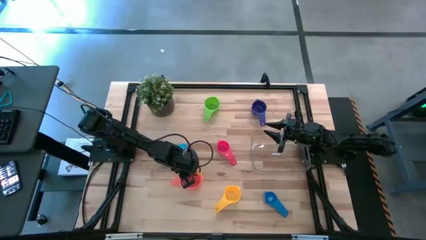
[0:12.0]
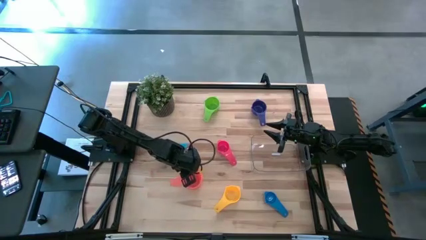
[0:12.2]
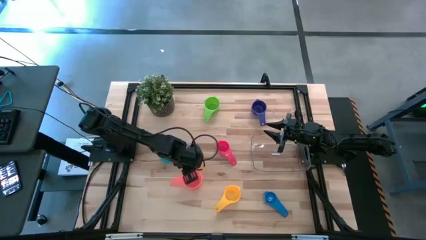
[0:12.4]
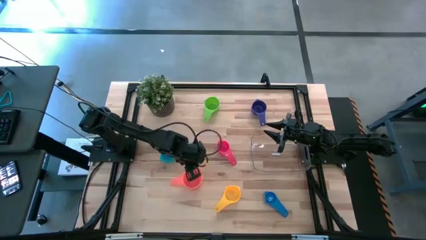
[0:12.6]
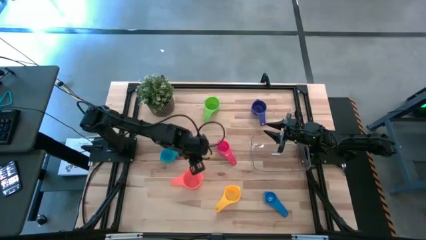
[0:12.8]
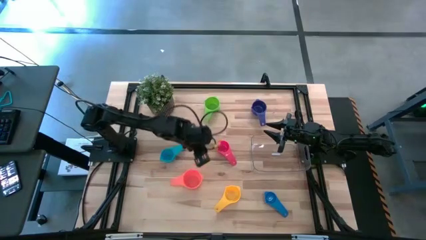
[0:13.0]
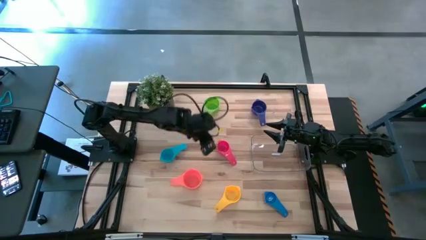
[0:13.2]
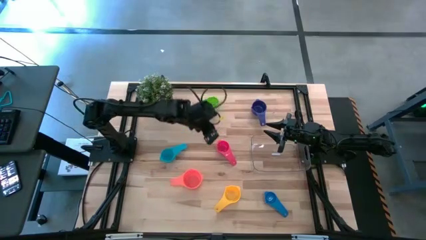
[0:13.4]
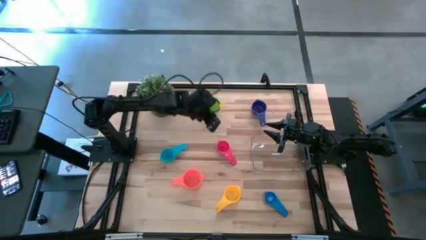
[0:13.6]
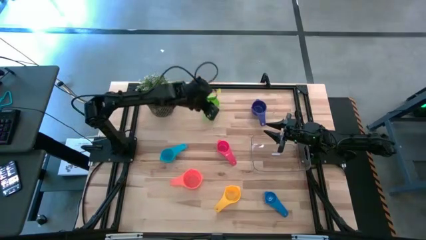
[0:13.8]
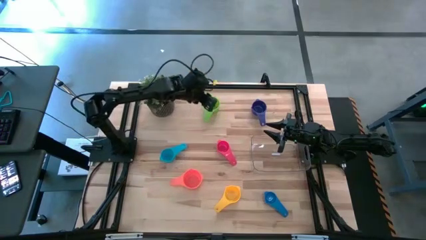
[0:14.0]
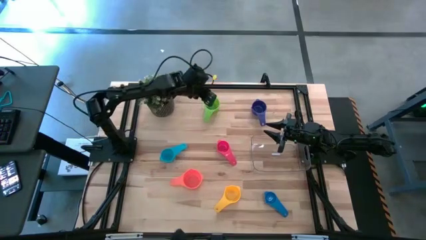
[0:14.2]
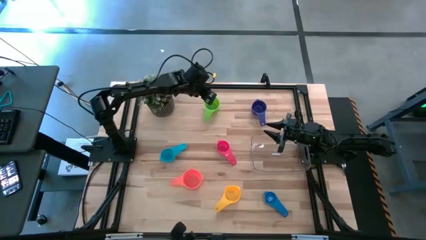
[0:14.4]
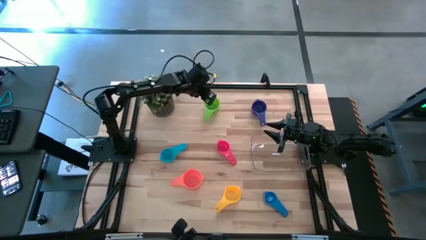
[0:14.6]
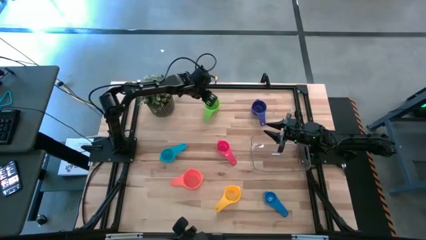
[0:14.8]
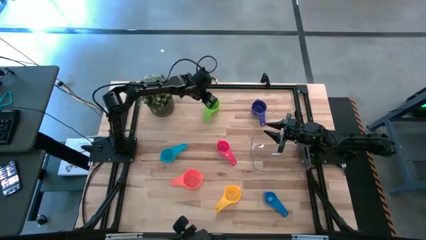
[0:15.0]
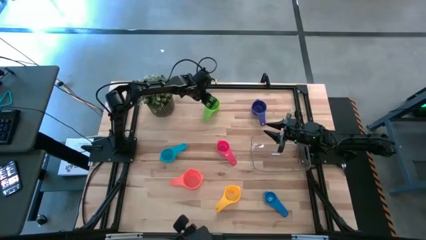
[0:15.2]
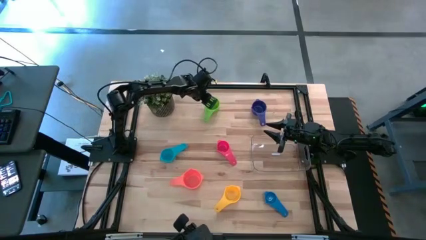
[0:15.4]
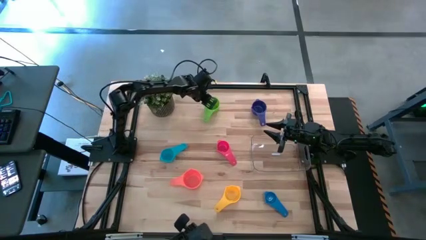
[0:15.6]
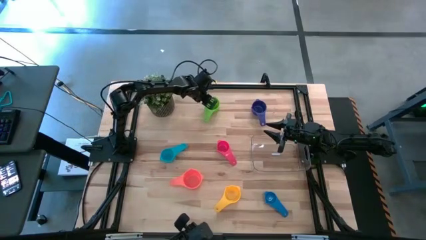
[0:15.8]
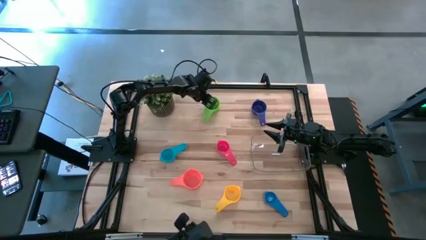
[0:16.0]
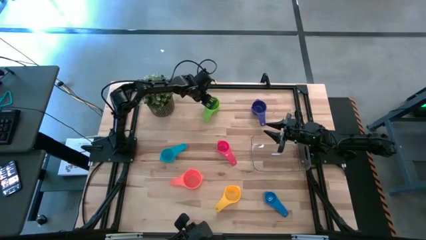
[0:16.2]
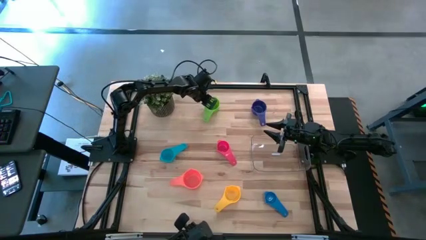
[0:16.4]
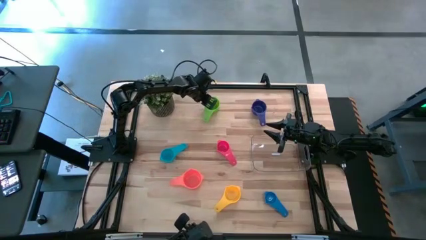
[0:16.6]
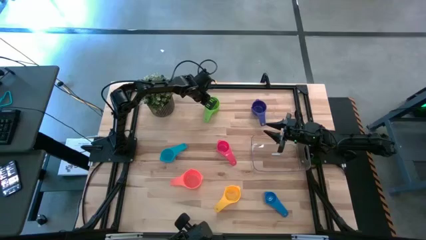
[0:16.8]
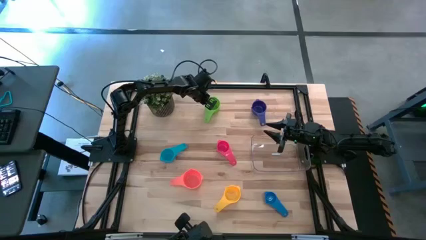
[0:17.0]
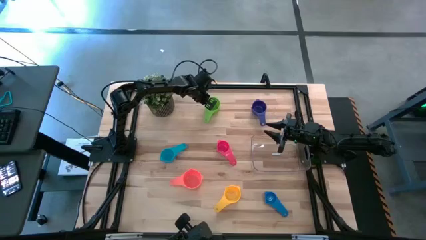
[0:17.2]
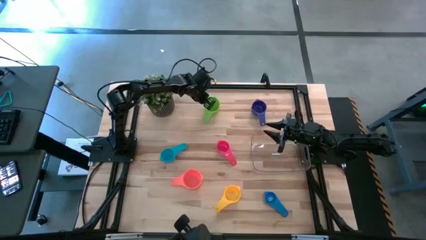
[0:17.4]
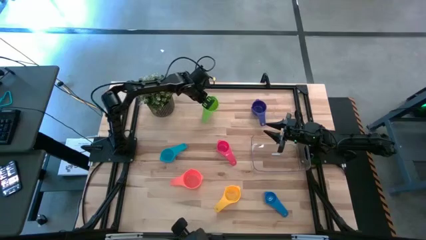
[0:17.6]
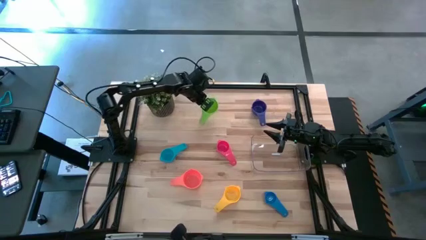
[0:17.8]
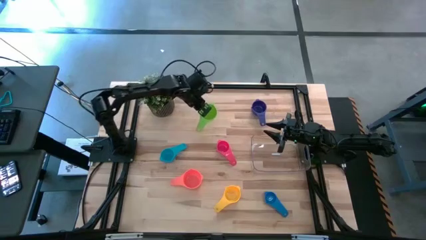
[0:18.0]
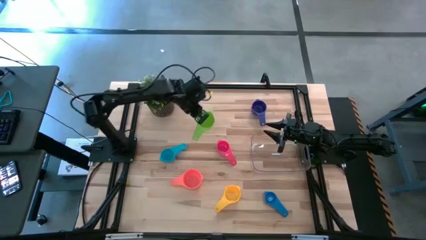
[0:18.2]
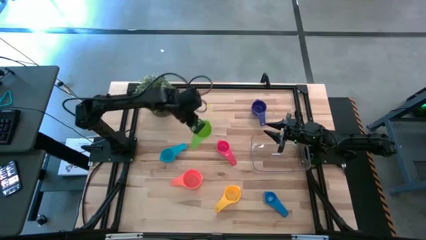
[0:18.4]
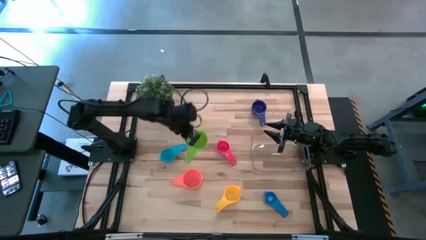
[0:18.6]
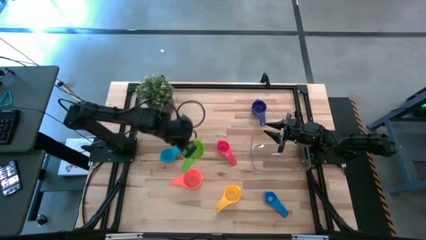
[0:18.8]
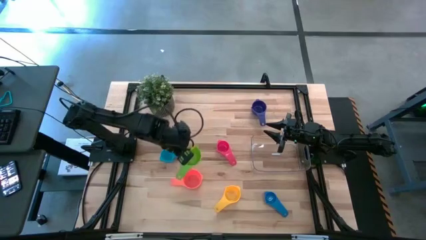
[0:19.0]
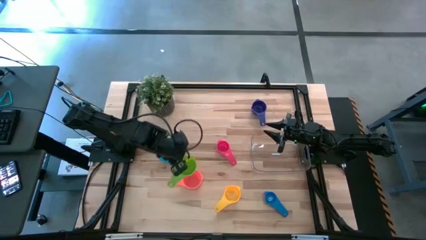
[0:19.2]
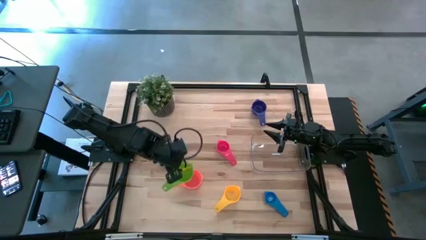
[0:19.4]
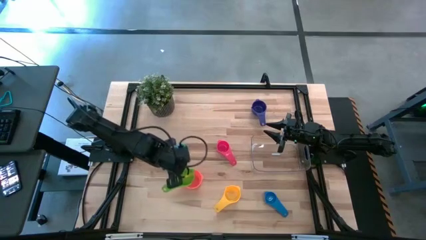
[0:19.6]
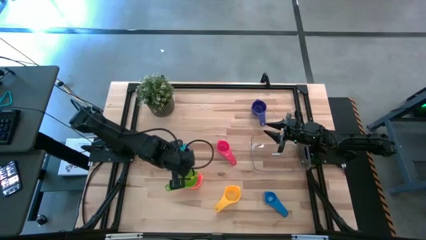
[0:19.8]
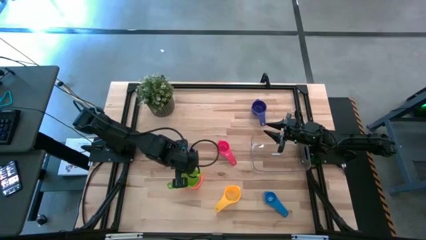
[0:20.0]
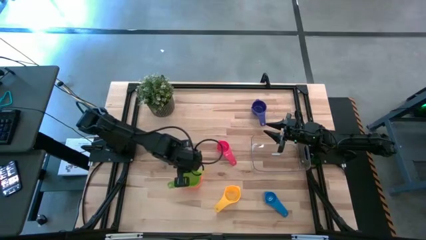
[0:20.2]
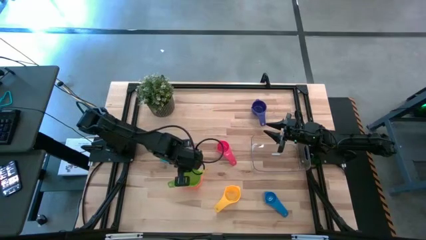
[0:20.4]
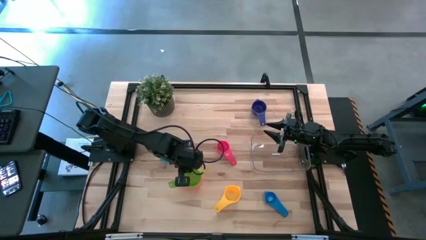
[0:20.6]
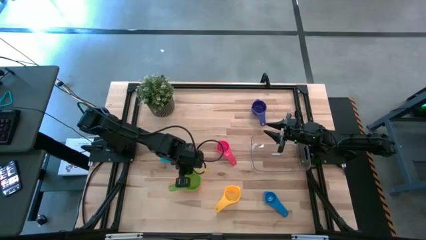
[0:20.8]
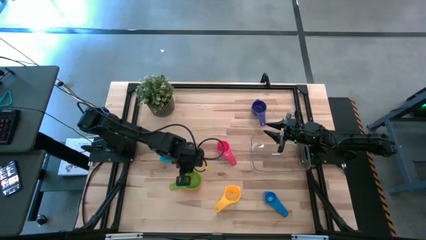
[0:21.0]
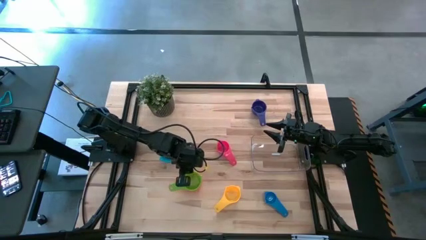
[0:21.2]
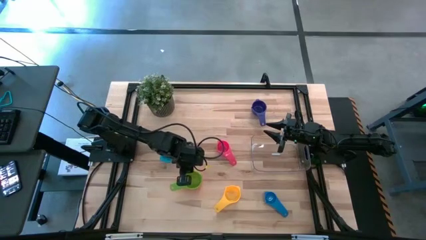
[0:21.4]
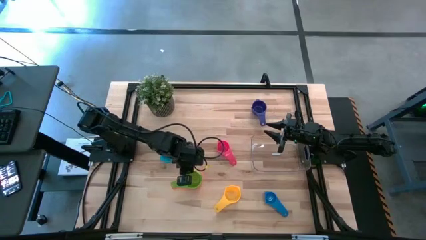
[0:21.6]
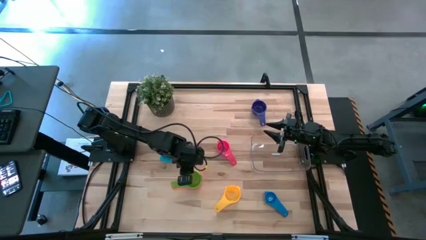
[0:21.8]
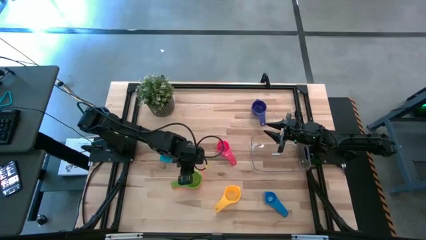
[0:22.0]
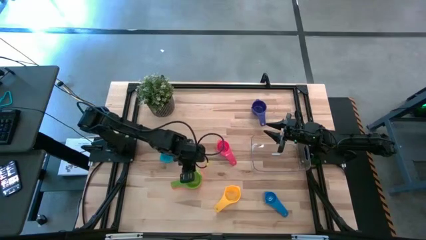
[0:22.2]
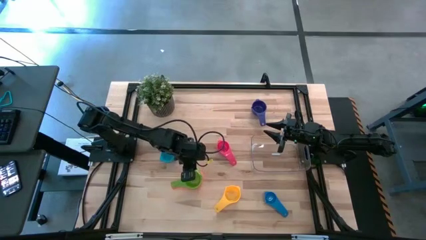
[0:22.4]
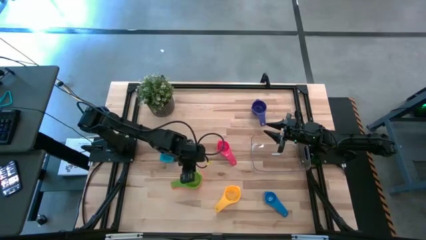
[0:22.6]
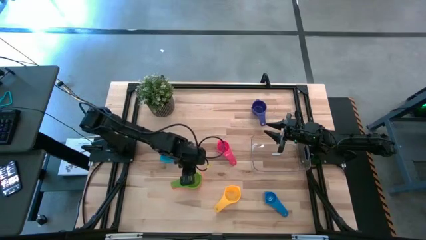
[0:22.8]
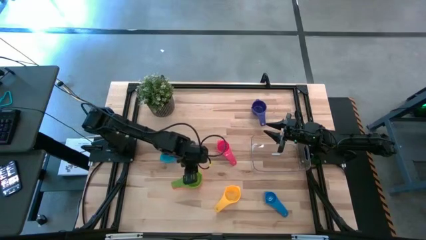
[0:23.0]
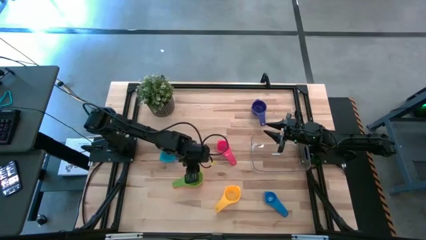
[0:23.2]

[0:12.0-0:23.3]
Task: Nest measuring cups in basket
Stack the green measuring cup on top of the orange measuring cup

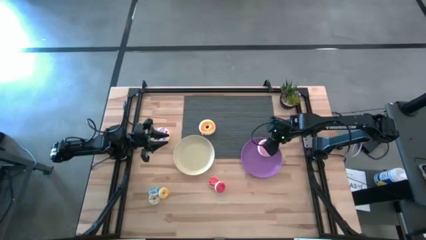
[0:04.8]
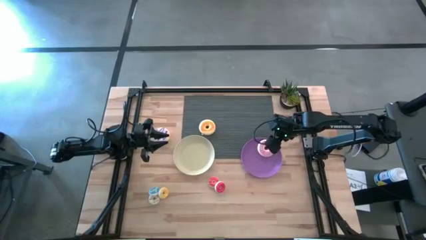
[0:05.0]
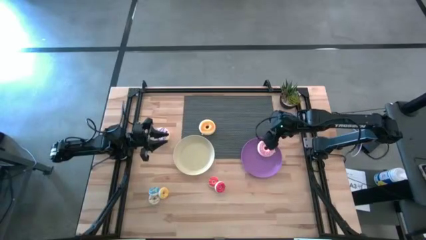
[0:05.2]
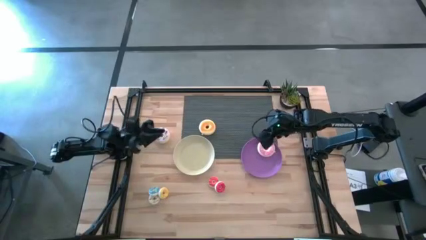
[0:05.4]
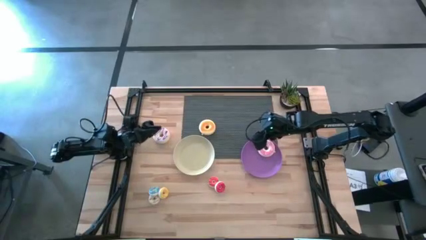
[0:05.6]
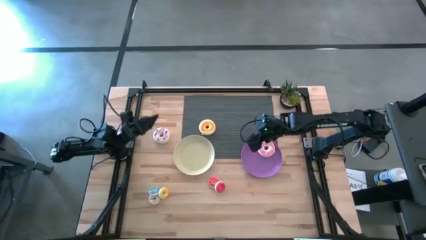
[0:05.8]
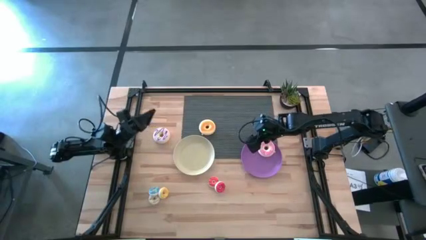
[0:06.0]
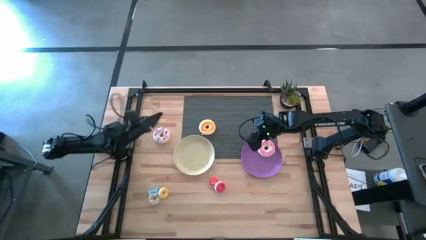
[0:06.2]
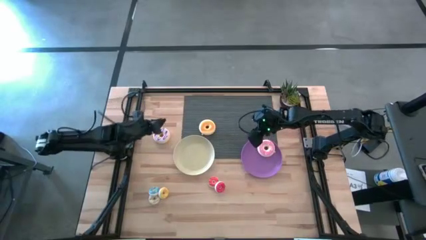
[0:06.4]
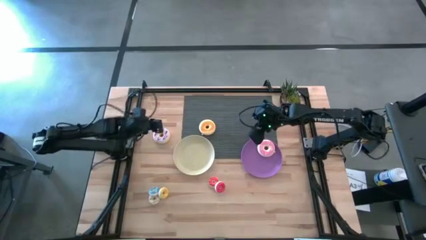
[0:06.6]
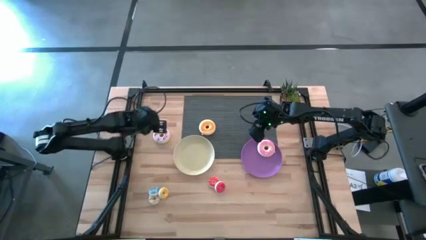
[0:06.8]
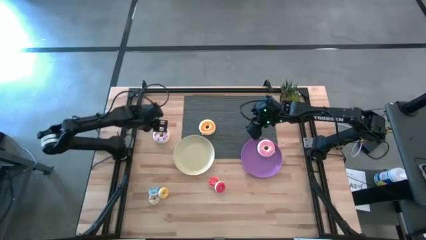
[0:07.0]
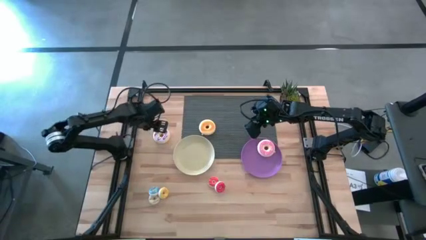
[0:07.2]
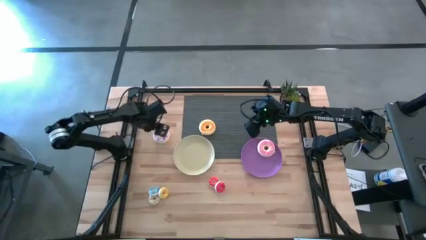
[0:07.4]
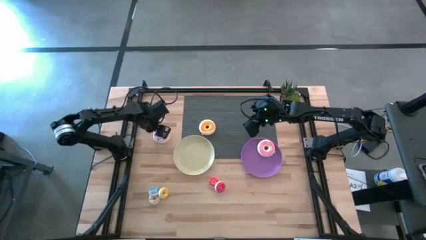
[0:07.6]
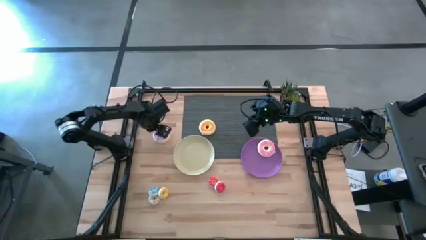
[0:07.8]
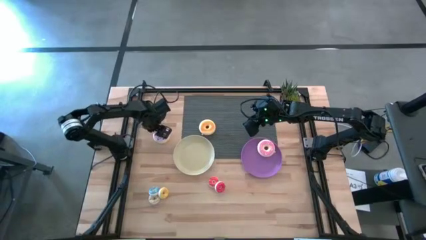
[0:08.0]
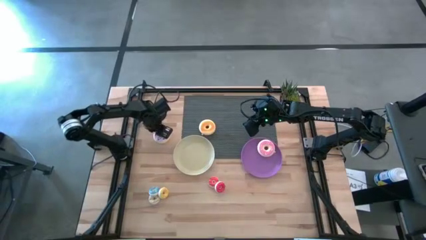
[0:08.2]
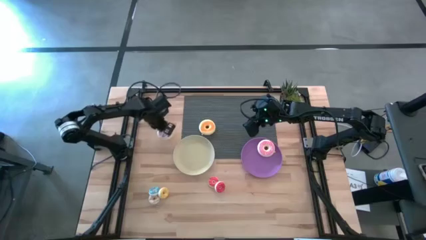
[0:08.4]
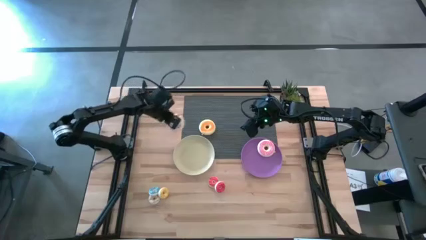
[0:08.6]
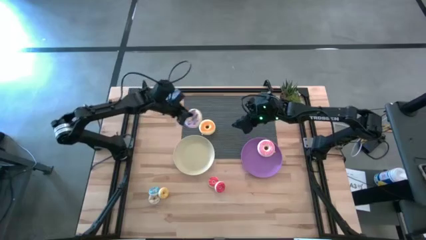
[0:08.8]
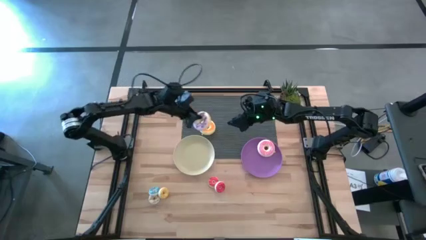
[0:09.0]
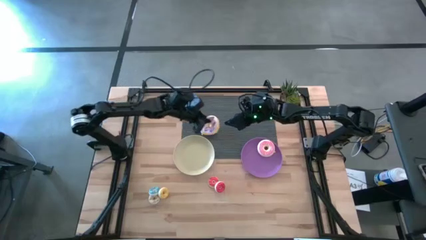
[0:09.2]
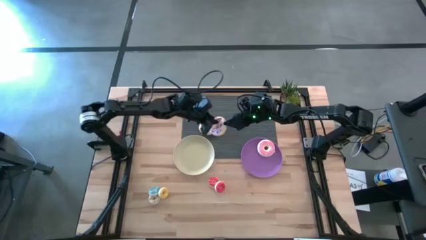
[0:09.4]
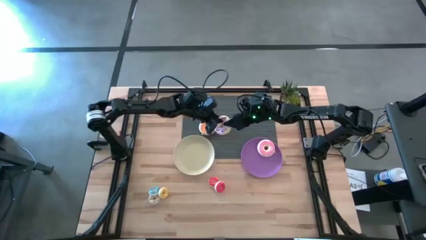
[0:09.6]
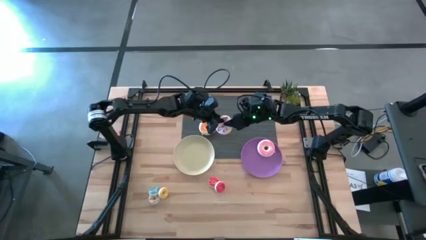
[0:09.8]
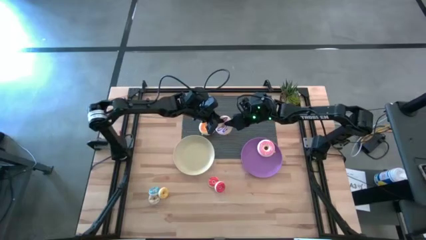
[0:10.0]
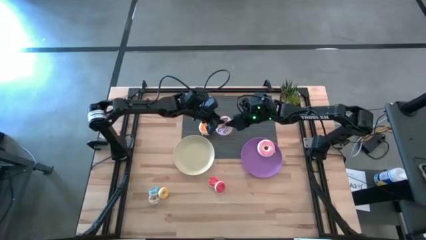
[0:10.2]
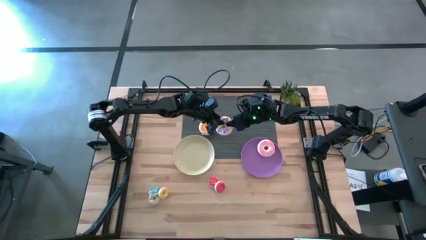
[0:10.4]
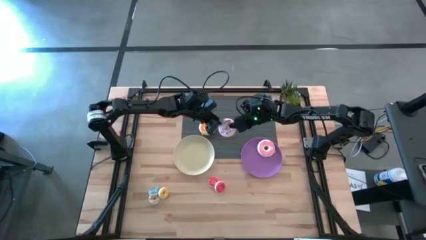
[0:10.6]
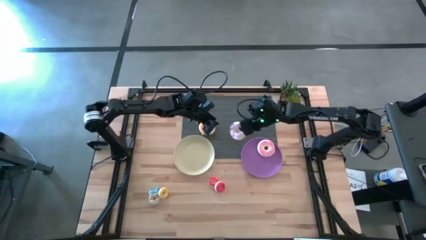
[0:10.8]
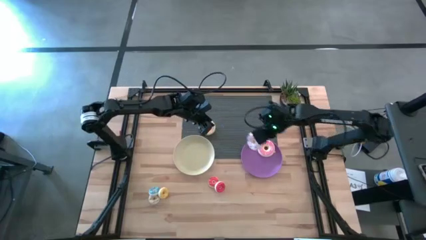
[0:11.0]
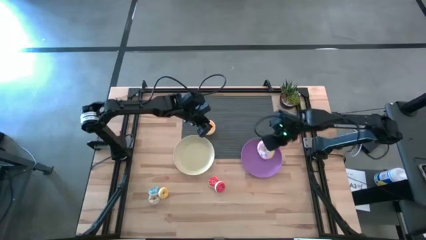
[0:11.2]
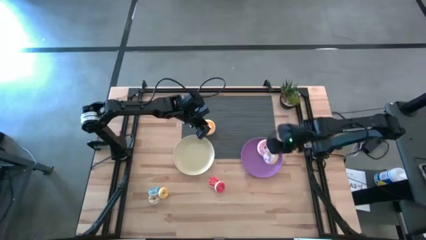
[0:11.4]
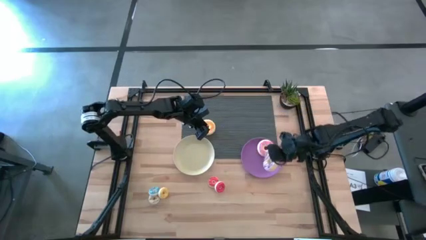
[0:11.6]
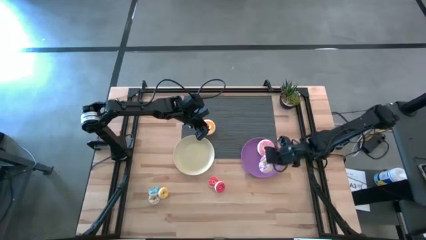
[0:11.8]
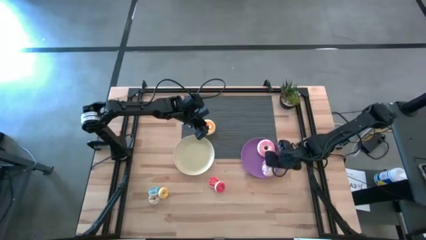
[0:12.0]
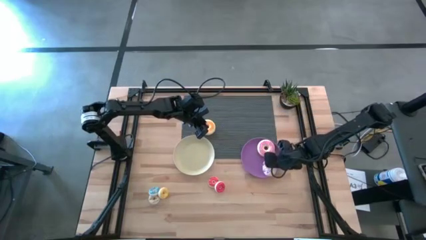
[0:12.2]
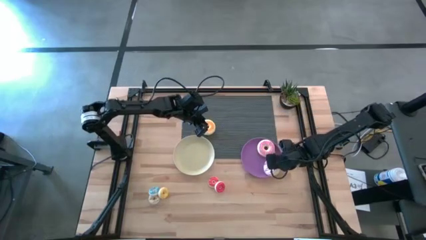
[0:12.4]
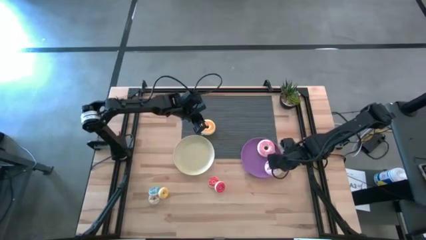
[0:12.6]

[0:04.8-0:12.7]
Task: Pick & Place donuts
Put the big purple donut on the purple plate
